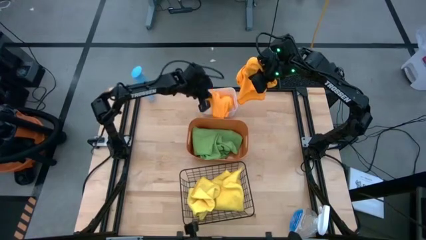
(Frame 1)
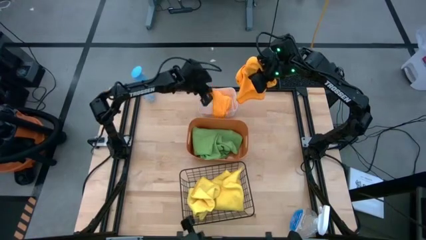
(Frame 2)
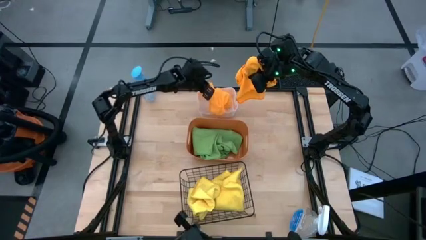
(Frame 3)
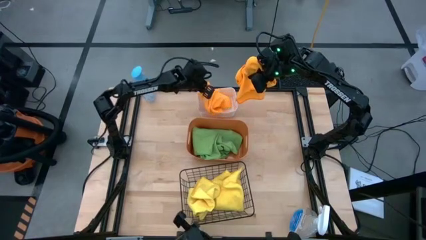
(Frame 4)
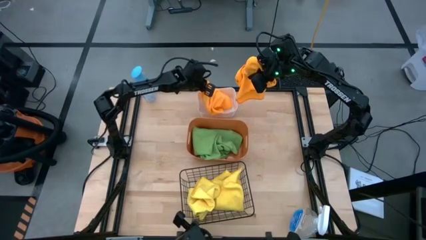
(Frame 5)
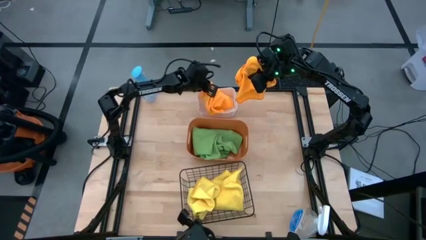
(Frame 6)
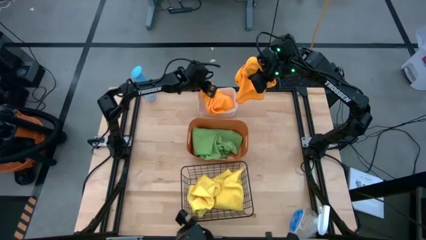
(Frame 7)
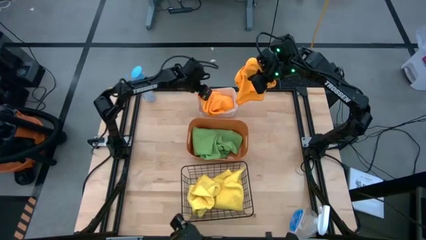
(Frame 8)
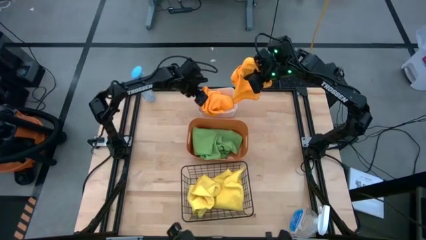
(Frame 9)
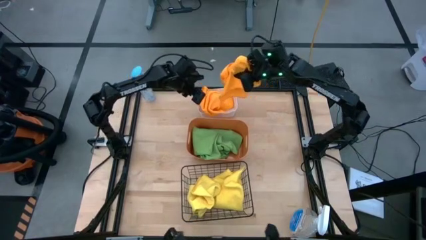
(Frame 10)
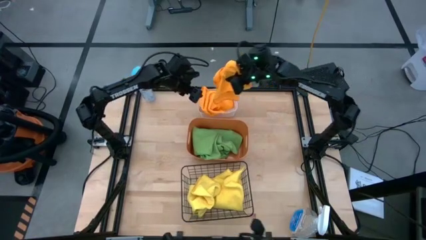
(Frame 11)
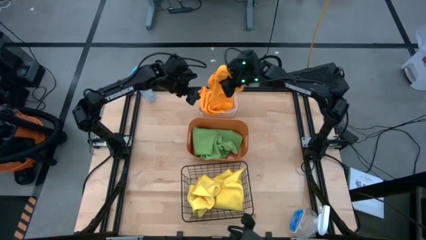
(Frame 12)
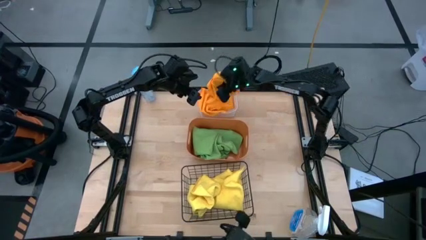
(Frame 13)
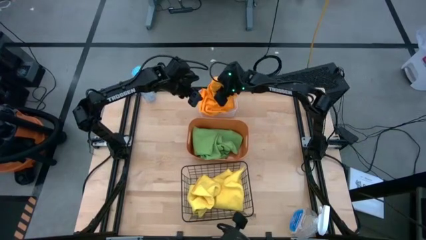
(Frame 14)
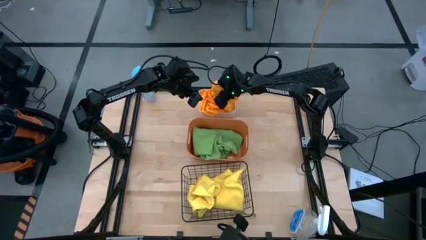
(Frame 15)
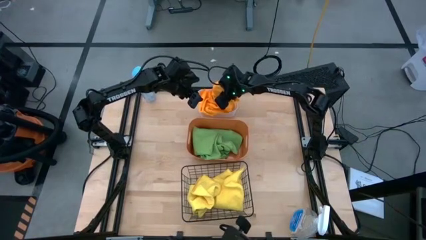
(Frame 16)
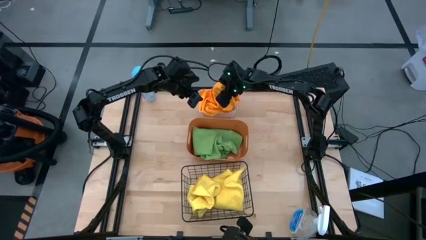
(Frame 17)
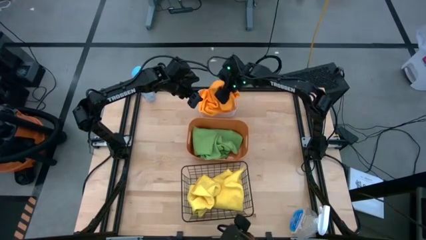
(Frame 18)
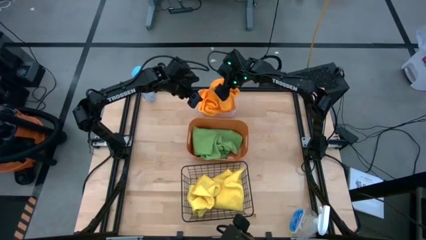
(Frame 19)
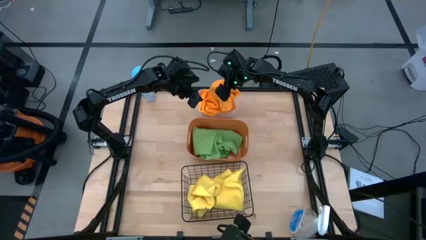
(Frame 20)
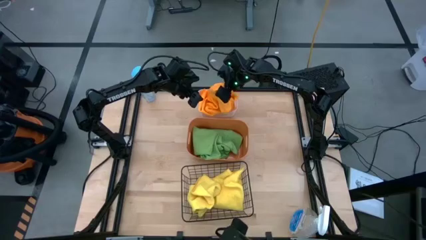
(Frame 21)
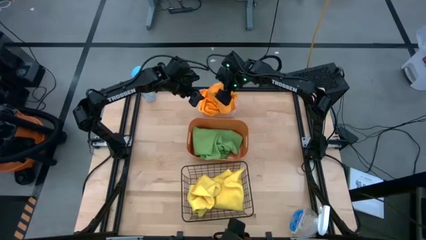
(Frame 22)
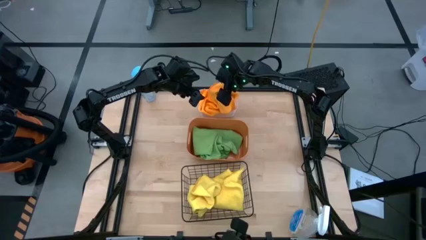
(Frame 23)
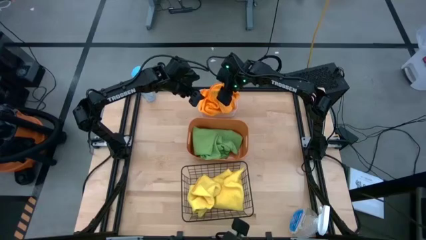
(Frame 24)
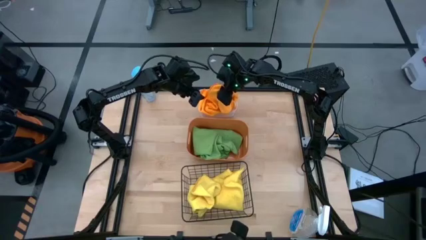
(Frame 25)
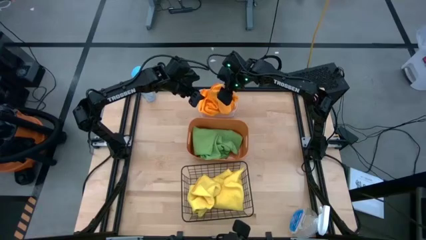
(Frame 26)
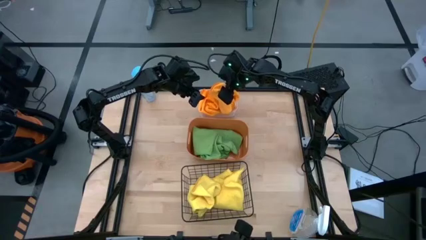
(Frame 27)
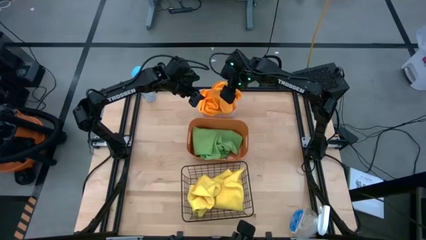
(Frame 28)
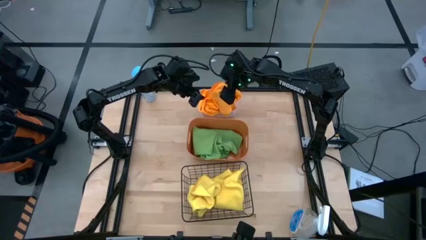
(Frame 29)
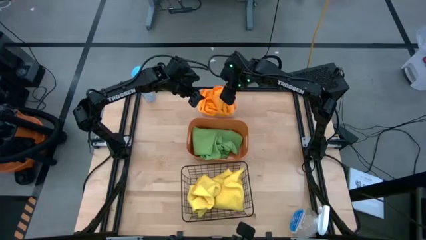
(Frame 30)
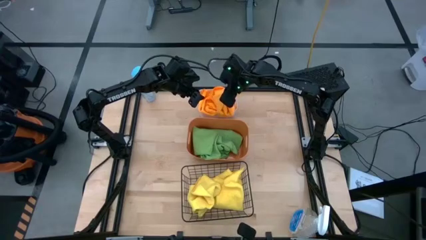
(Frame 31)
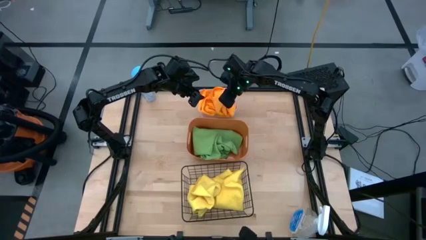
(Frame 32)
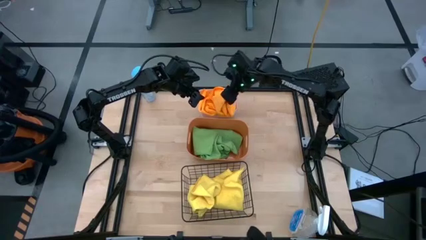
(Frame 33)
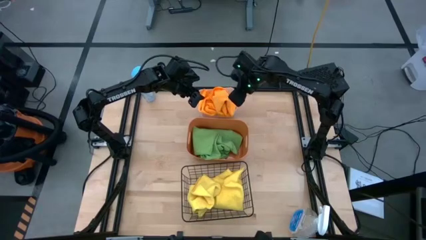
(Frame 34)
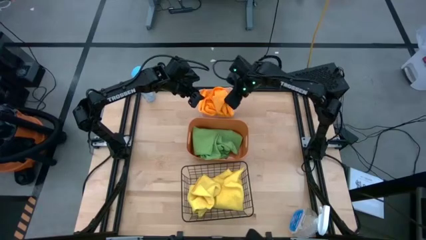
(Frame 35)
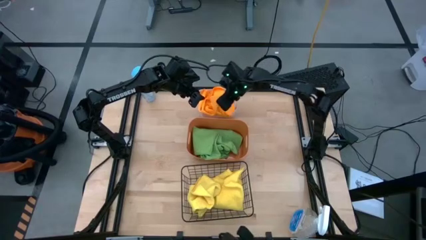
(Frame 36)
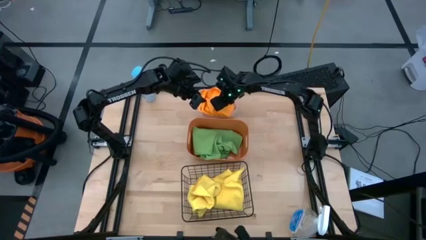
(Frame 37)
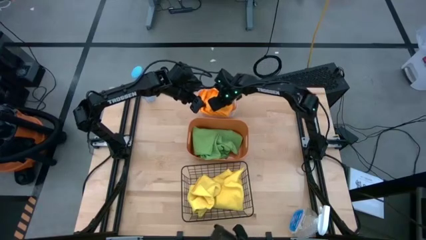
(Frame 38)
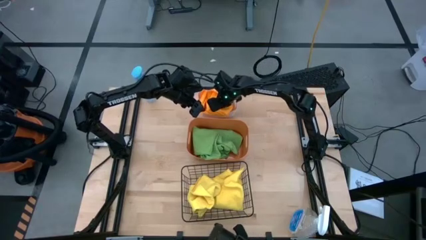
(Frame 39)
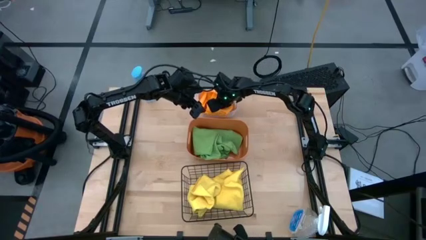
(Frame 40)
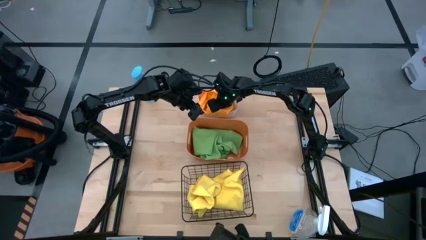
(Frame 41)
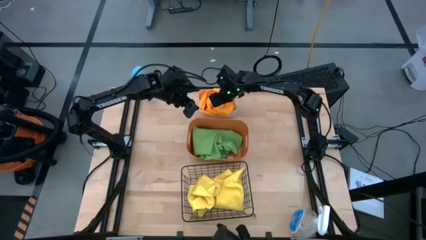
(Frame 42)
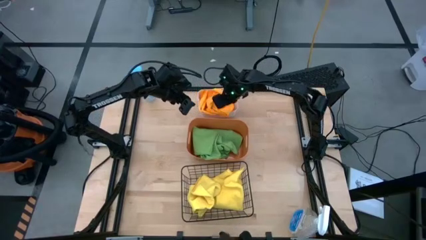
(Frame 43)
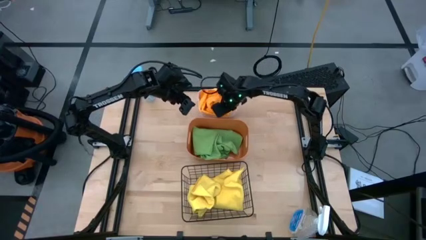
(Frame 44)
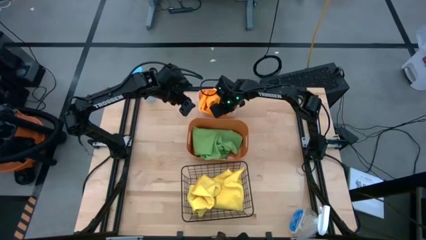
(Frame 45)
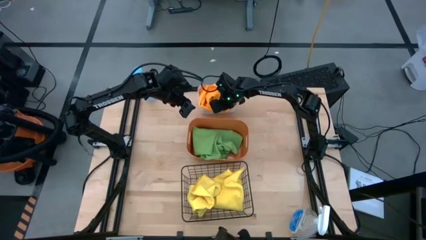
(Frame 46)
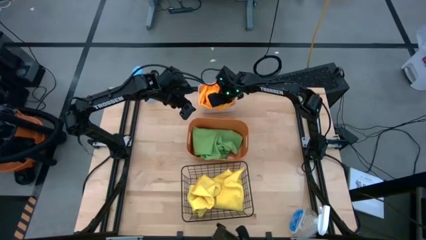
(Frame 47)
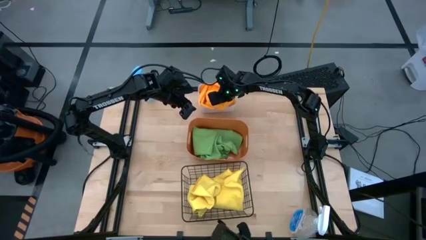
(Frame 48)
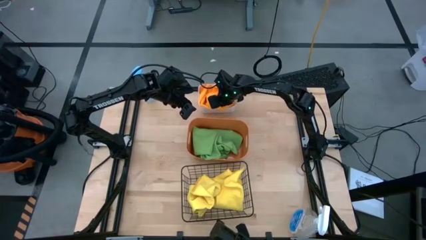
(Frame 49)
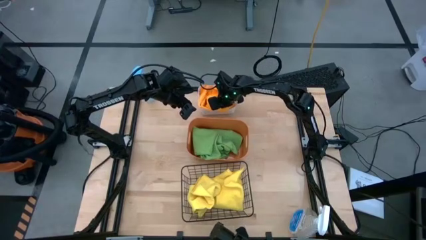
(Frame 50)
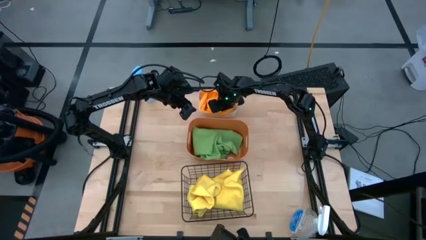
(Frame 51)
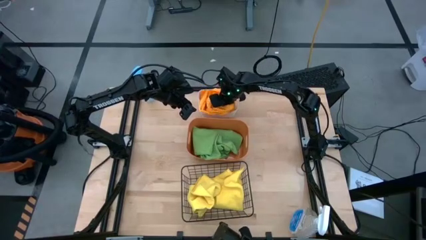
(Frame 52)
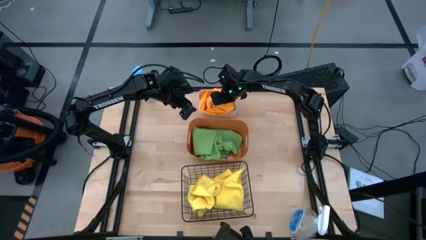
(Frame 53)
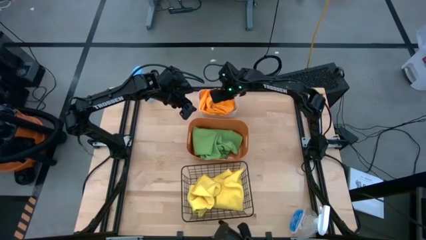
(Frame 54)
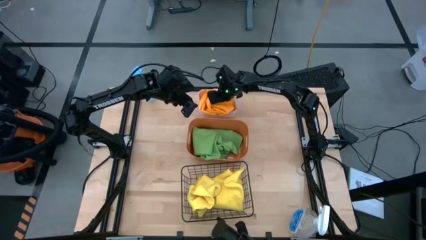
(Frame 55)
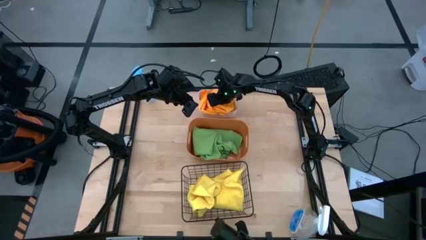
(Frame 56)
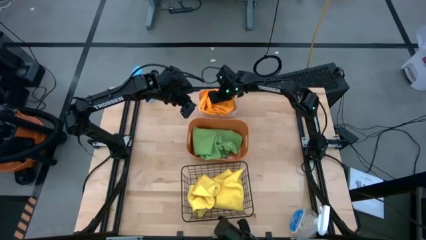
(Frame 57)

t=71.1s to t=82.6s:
Task: Sort microfiber towel by color & place in baskets
Put the orange towel into the white bin
